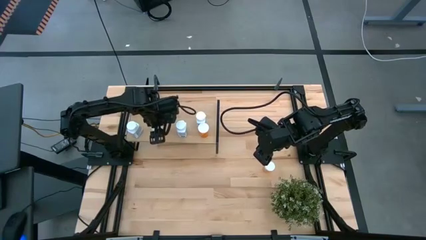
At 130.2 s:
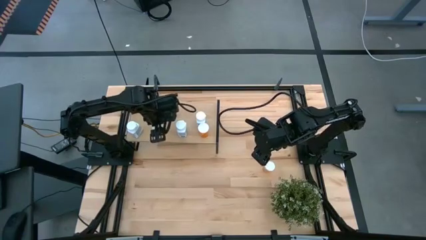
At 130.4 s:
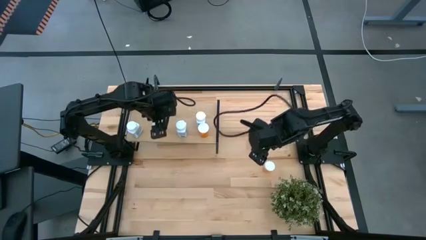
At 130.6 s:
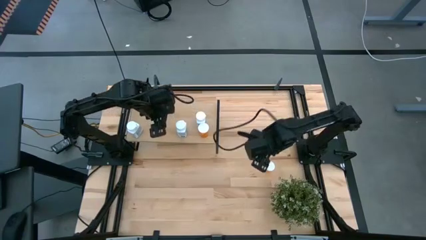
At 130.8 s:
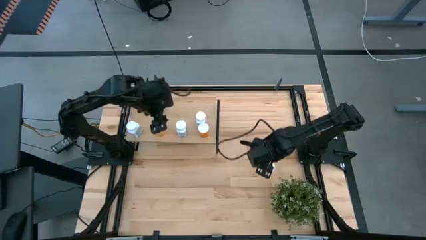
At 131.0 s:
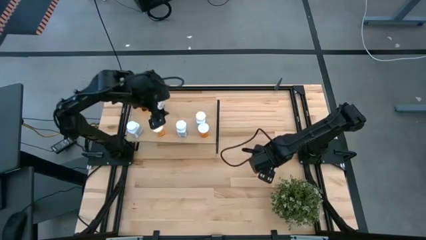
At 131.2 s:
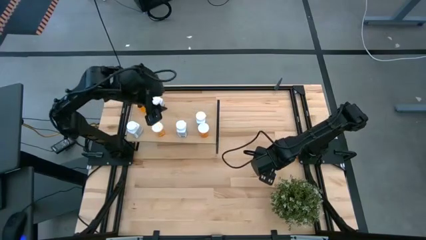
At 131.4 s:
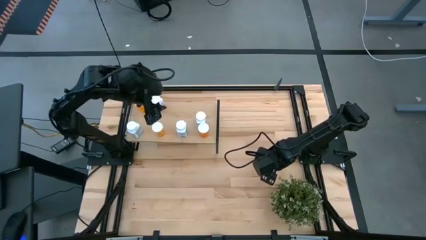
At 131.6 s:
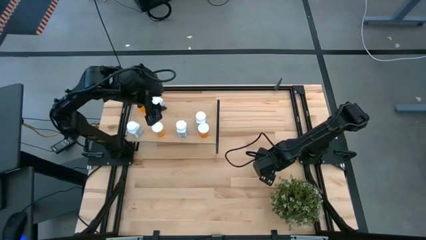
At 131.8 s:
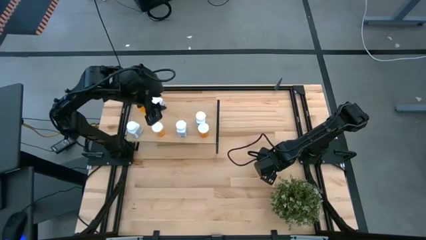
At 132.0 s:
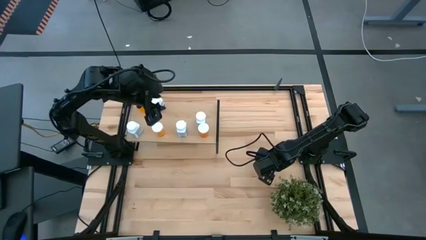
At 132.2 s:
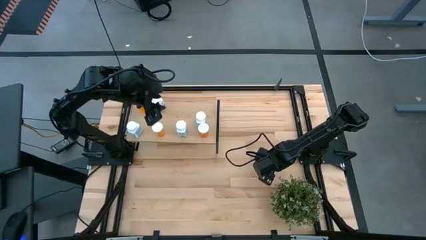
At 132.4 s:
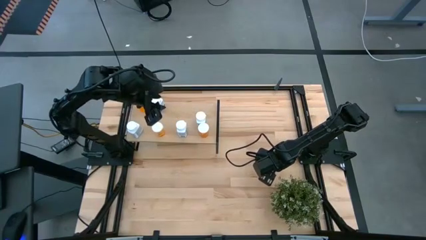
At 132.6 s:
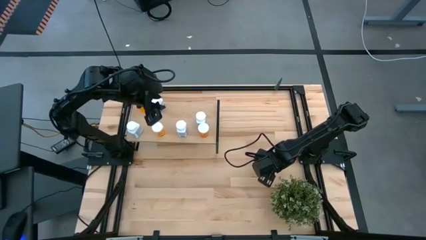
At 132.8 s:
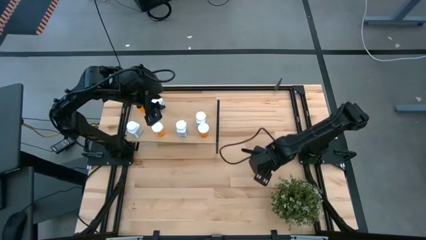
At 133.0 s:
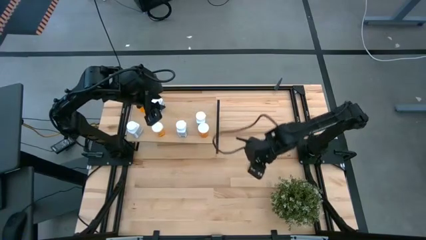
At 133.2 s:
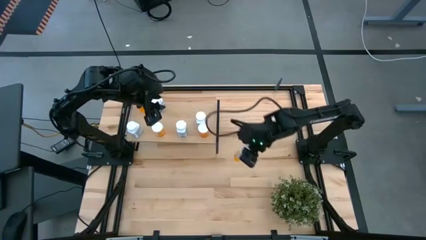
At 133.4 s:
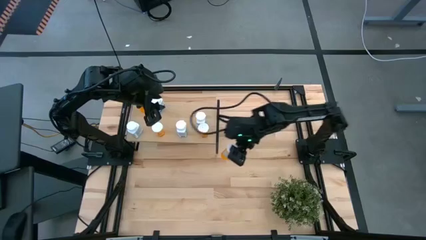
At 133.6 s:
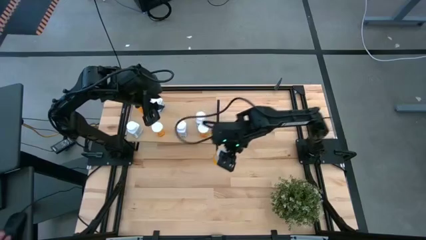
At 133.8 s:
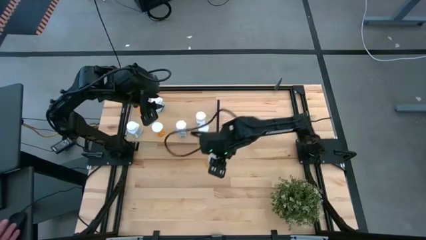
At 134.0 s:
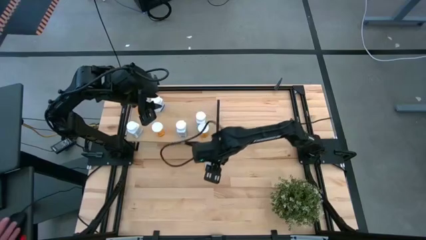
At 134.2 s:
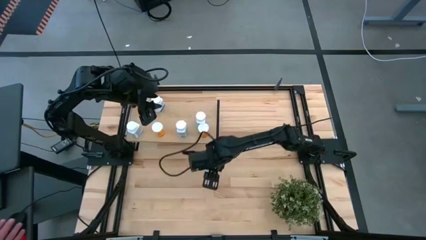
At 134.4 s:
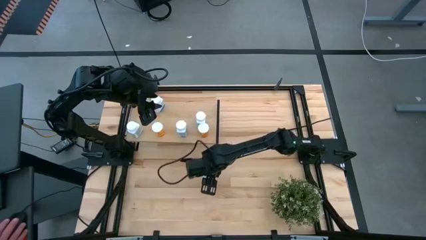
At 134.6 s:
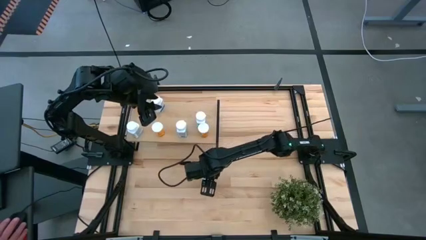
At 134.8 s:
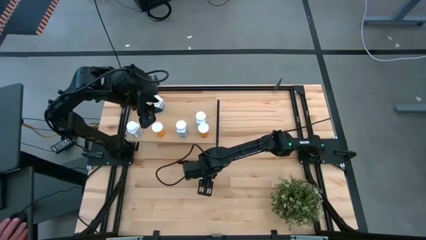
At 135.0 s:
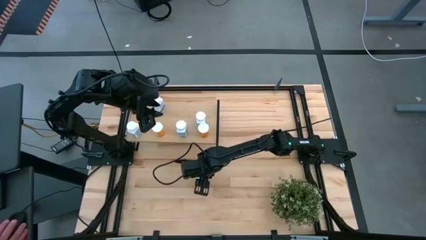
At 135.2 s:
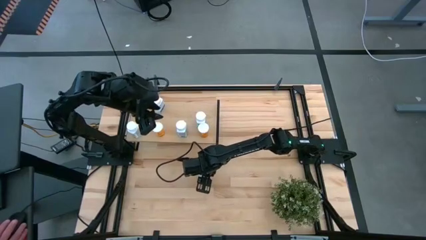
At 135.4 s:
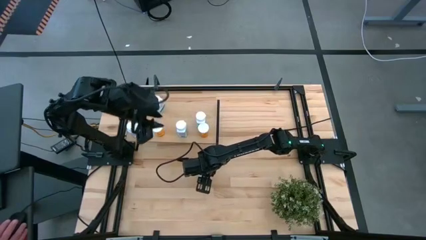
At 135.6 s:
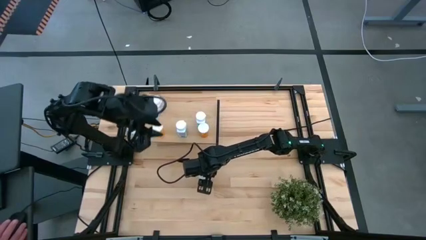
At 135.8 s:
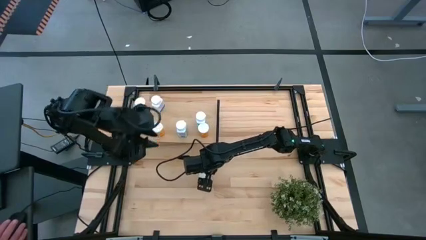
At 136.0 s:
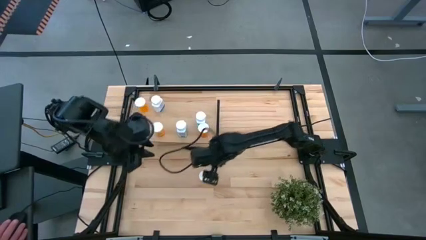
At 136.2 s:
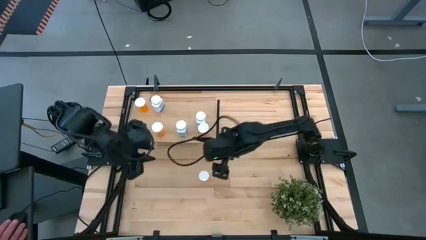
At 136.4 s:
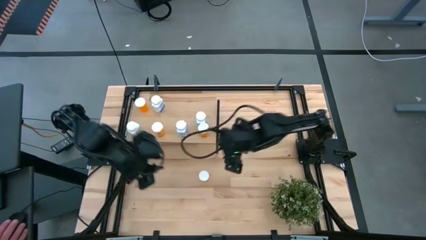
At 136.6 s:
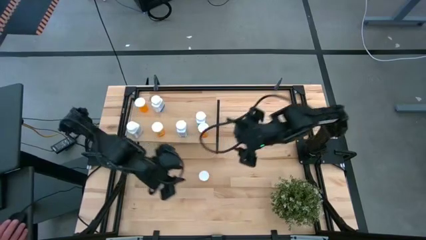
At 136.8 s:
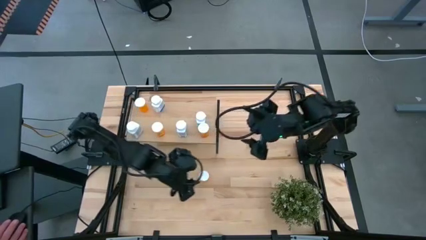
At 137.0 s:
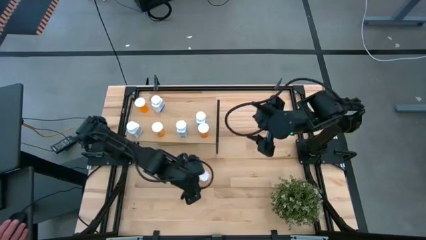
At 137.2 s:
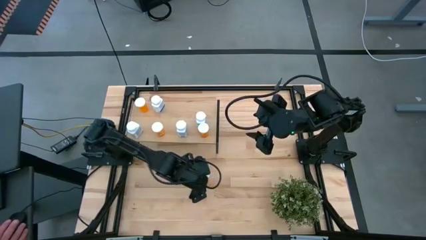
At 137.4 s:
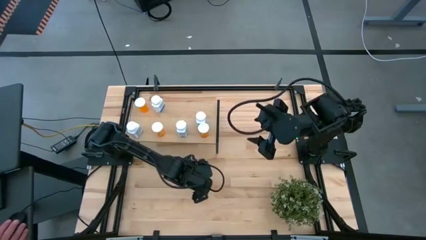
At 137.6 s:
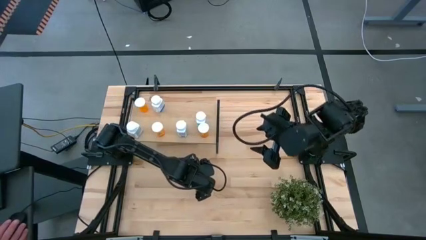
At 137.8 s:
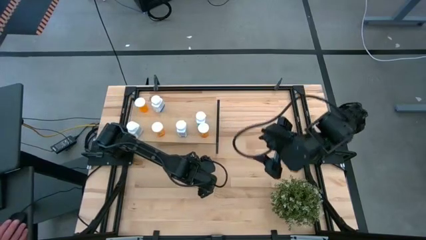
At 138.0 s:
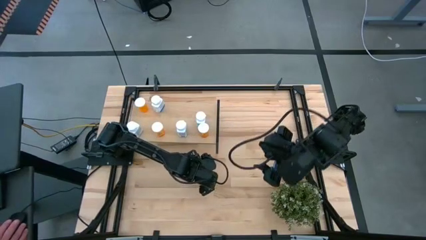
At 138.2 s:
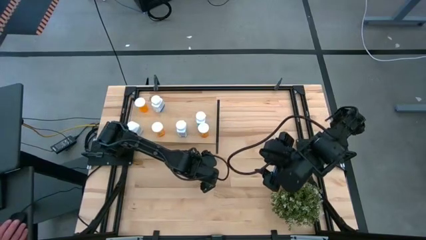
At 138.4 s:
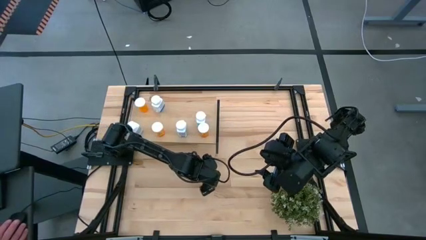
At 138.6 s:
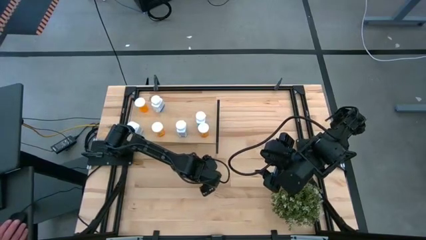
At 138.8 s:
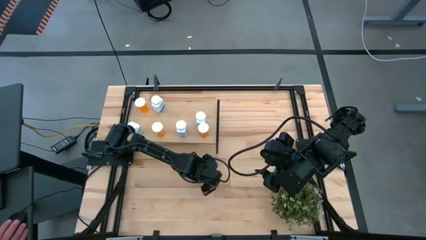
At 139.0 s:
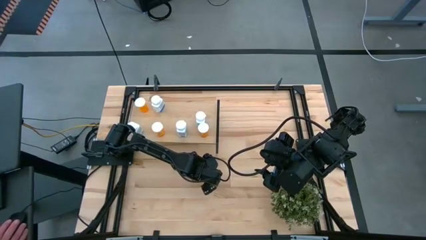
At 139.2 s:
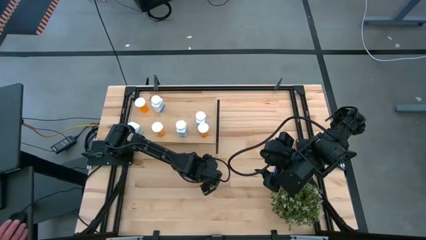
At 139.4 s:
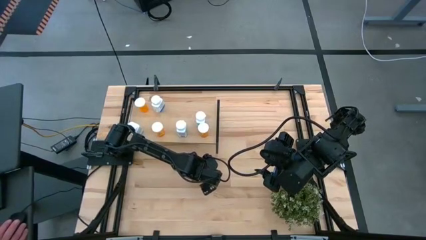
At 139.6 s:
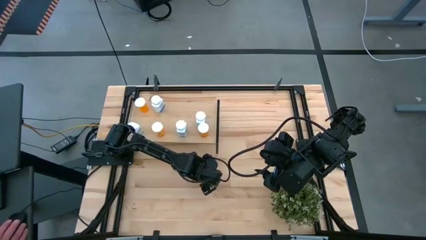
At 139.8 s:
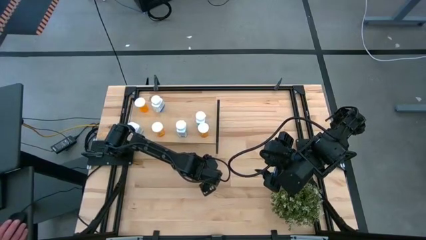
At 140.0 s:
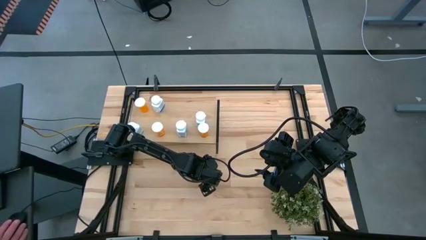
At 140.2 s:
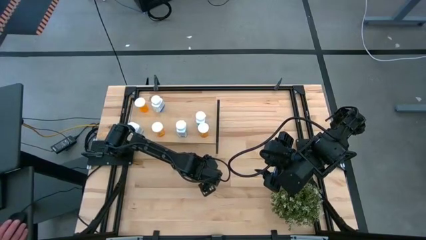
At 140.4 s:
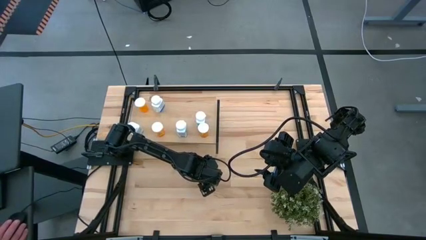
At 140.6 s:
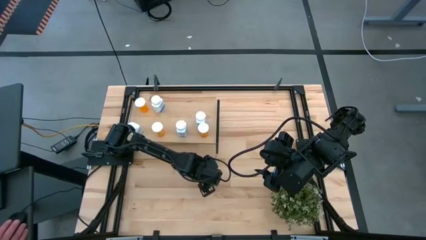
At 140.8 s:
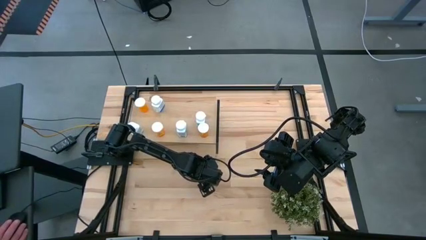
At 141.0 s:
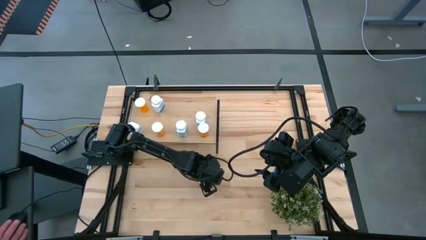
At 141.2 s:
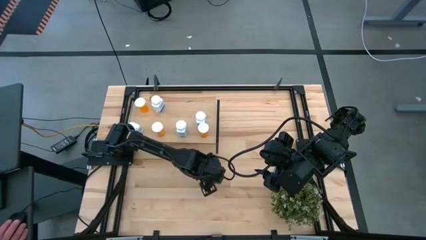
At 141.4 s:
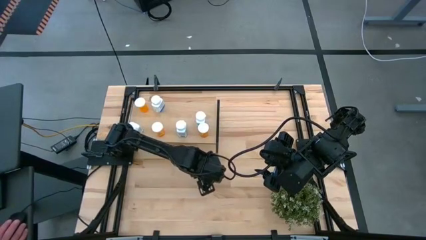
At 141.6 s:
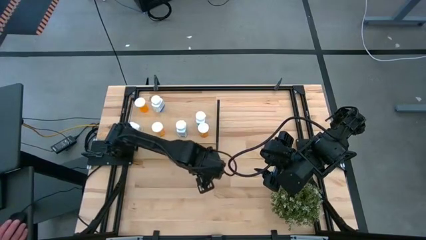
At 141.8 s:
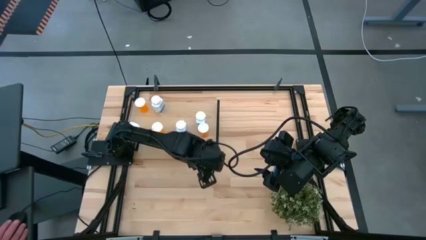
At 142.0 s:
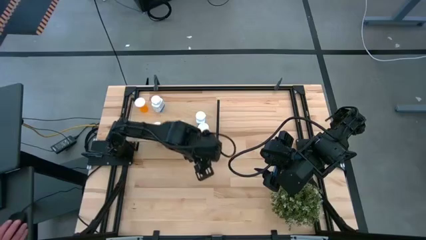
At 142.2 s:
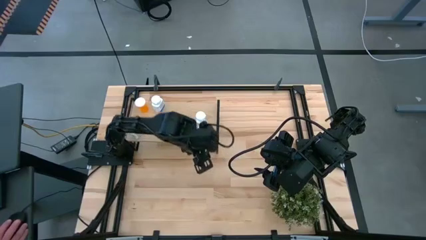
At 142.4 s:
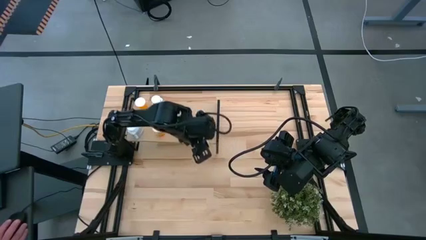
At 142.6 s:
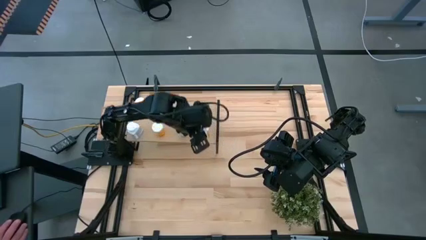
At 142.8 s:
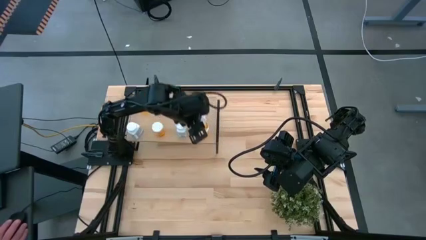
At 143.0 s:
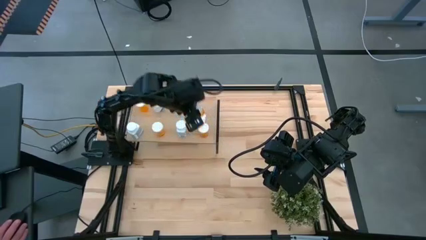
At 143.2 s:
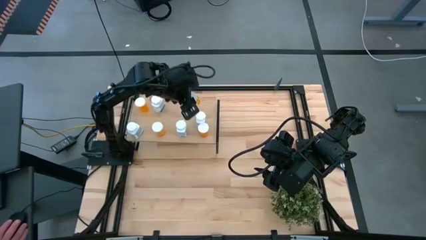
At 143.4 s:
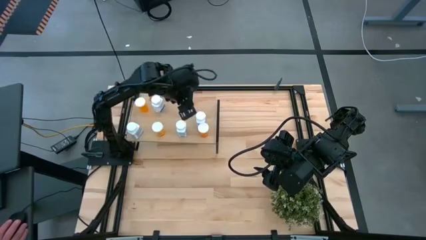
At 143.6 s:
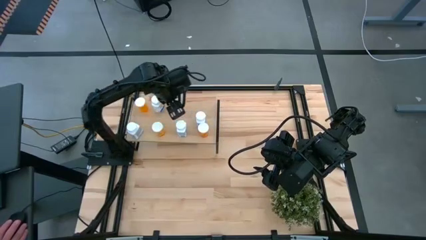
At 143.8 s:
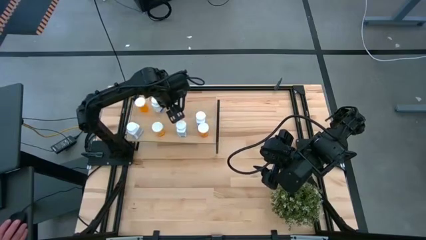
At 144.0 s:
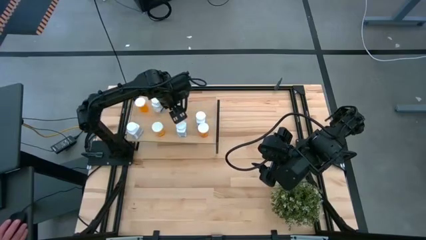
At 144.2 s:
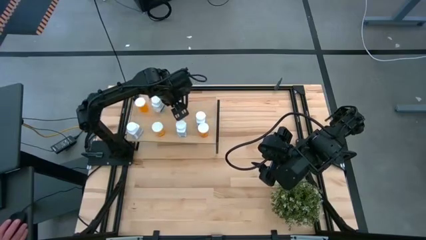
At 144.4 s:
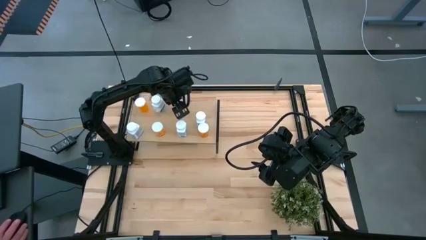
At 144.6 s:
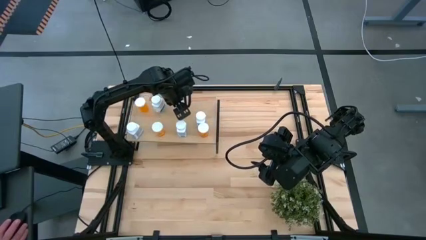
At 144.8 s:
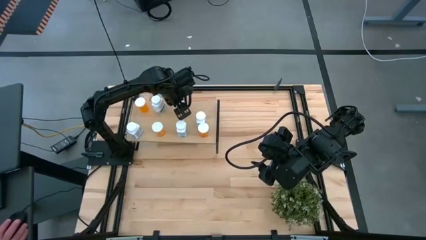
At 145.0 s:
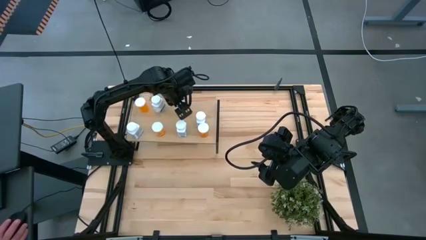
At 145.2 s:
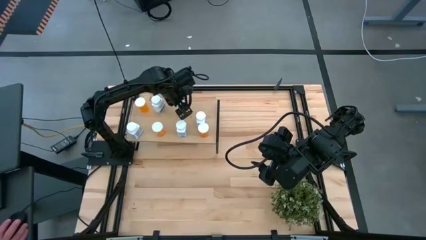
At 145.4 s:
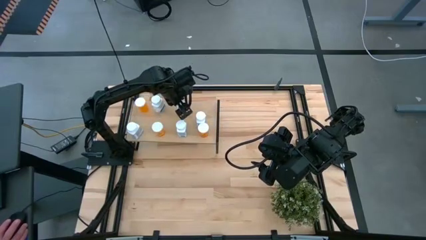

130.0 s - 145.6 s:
Task: Pick and place medicine bottles onto shelf by color
Put the orange pill bottle on the shelf

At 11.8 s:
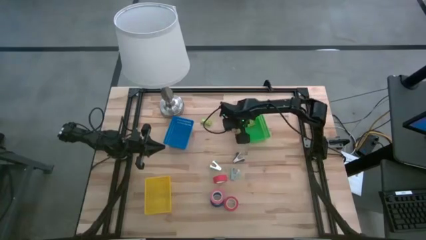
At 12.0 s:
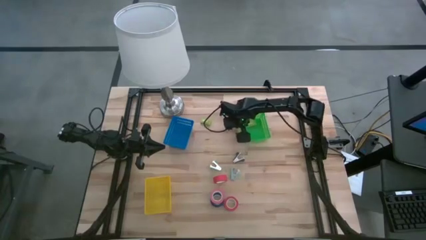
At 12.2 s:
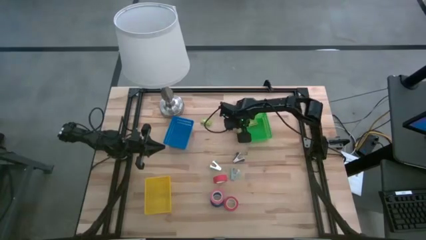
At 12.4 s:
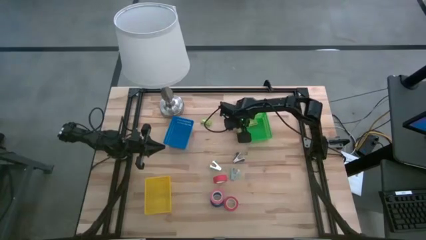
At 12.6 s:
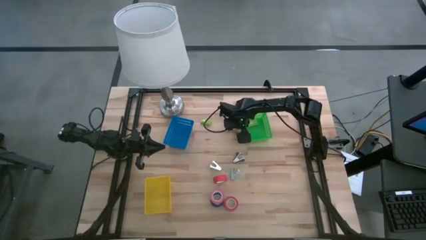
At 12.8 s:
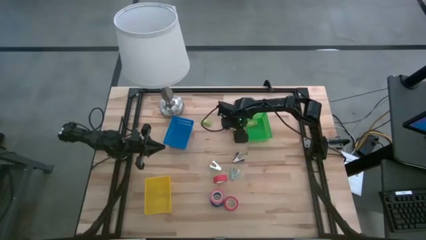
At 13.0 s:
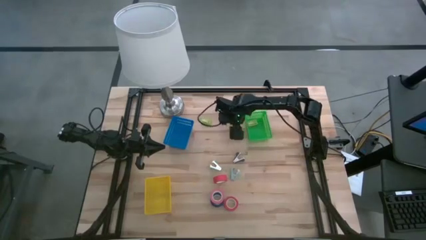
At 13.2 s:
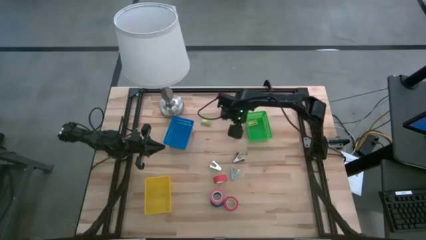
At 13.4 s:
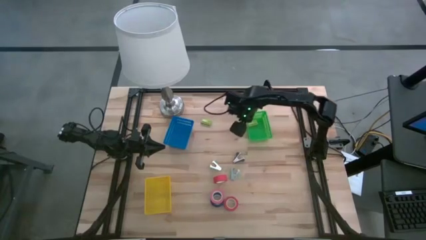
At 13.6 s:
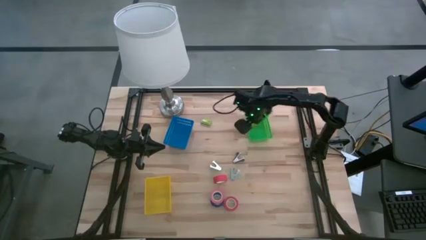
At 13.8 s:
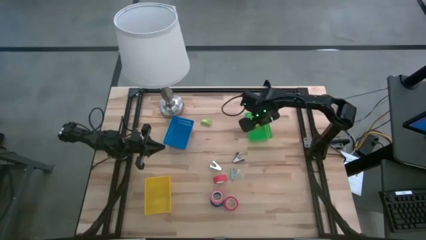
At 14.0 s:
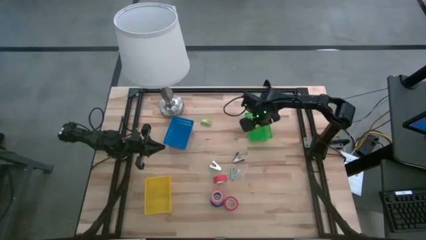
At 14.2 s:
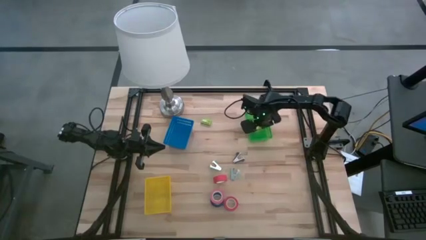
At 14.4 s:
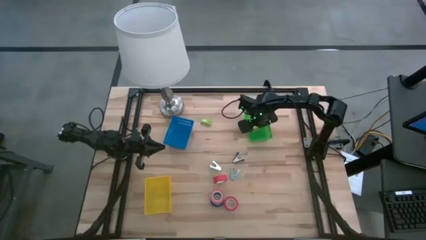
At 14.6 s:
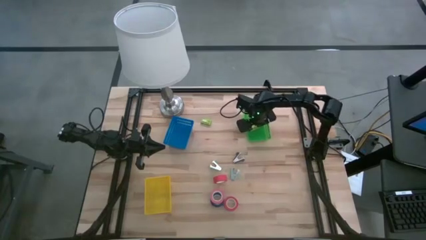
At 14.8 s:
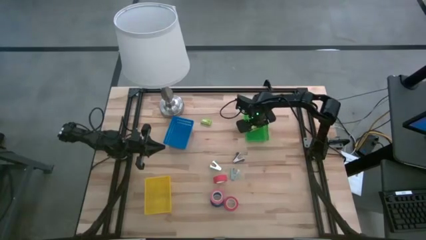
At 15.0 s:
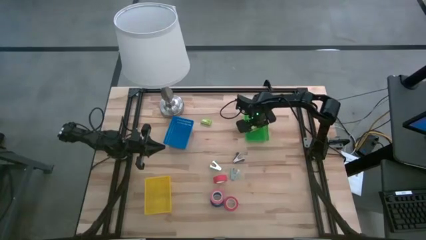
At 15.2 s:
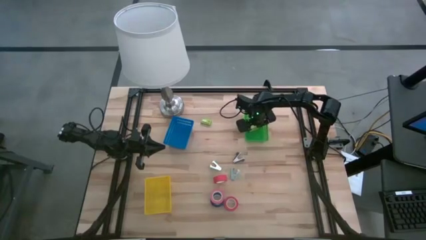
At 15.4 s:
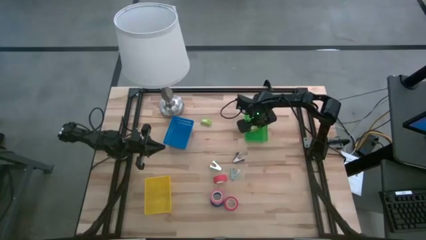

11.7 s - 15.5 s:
Task: Pick and place Stapler, Stapler remover, tape
Put the right green staple box into the green bin
